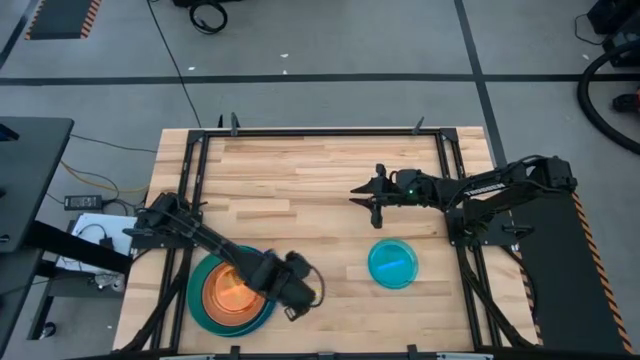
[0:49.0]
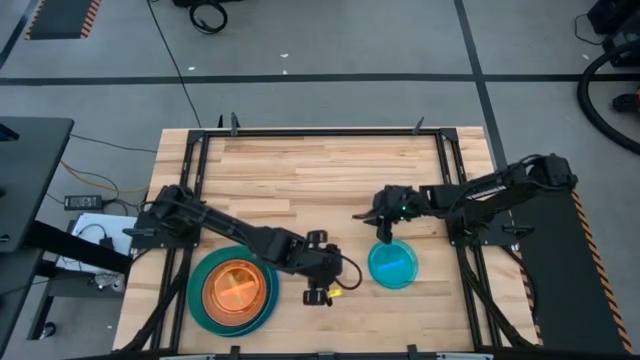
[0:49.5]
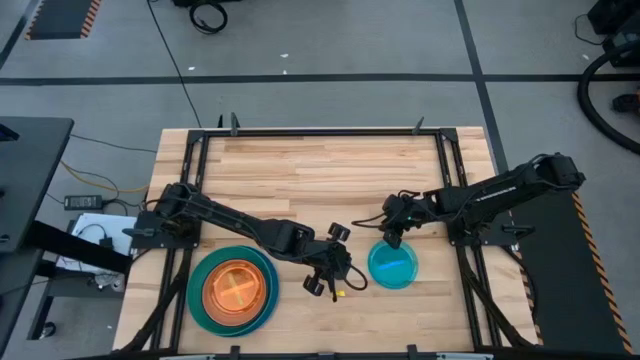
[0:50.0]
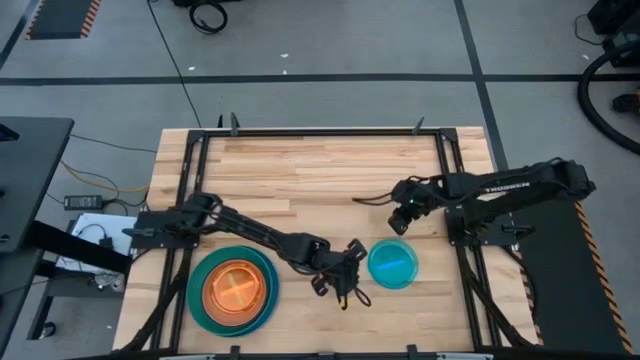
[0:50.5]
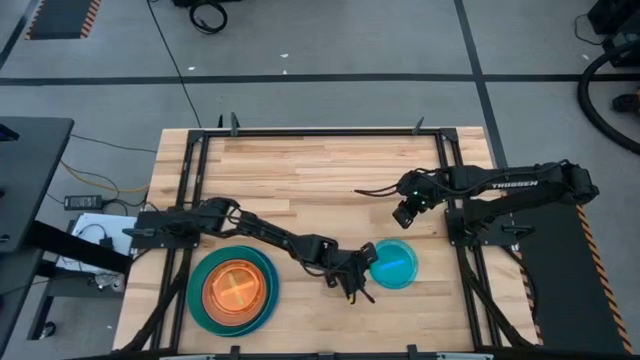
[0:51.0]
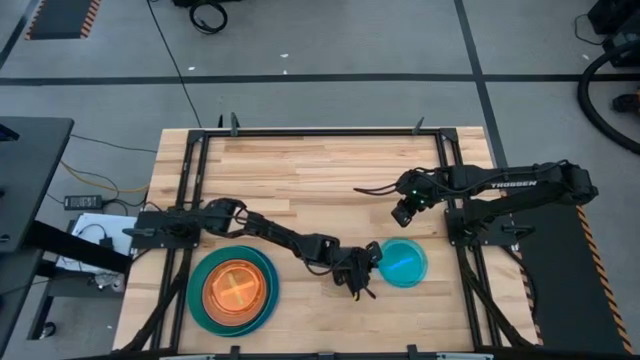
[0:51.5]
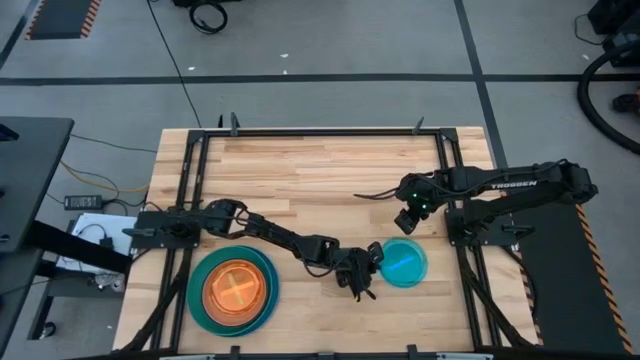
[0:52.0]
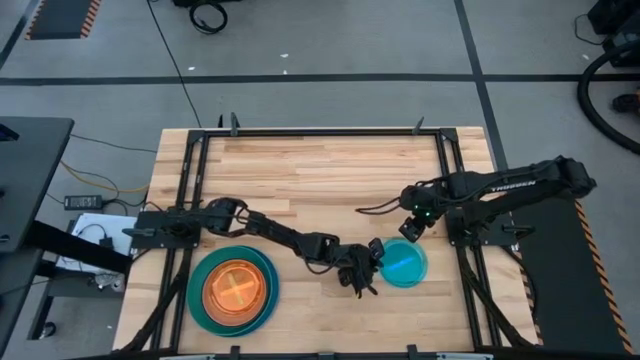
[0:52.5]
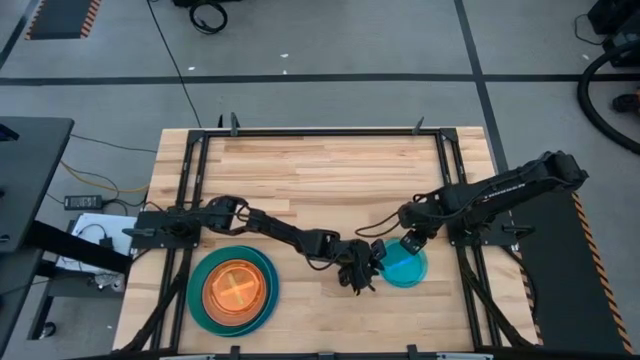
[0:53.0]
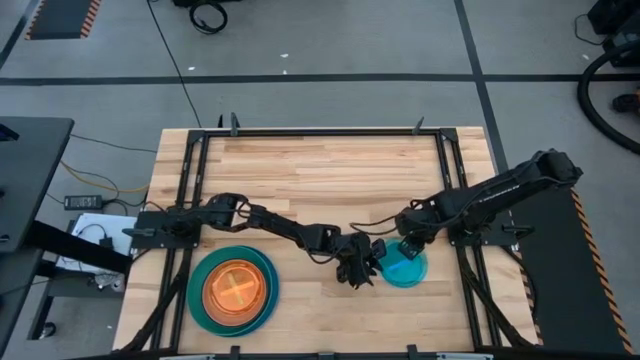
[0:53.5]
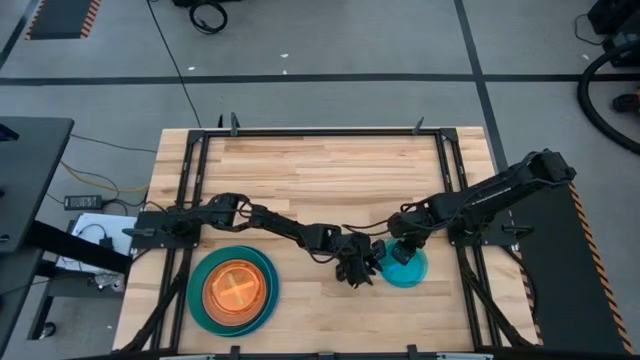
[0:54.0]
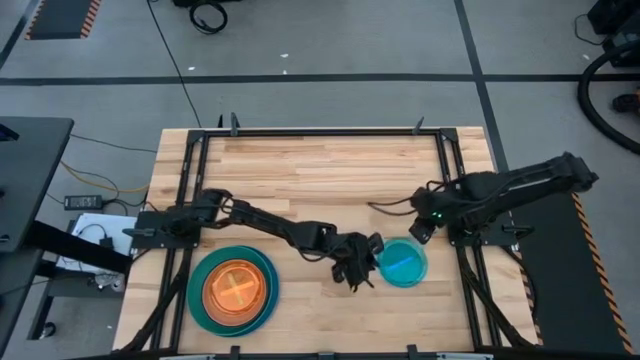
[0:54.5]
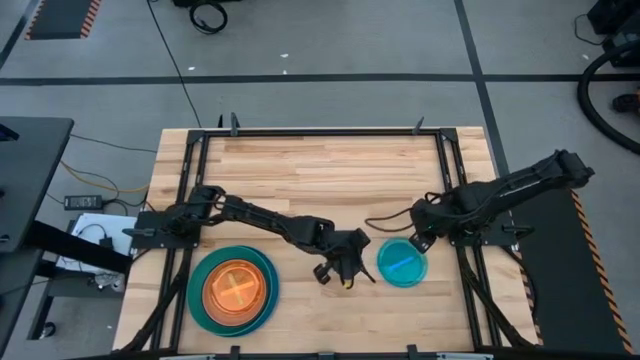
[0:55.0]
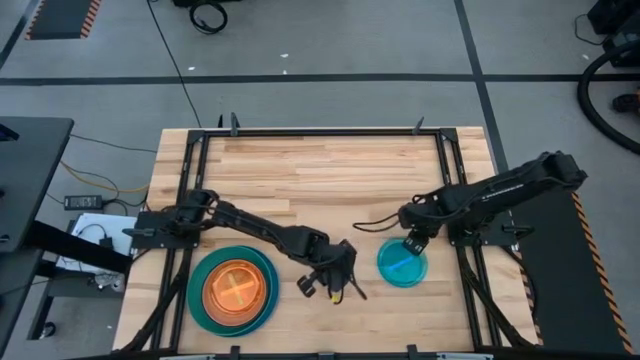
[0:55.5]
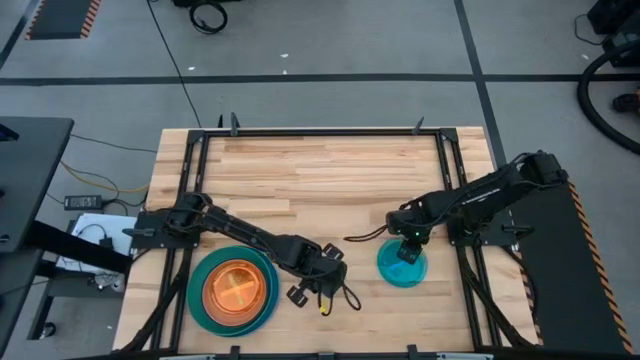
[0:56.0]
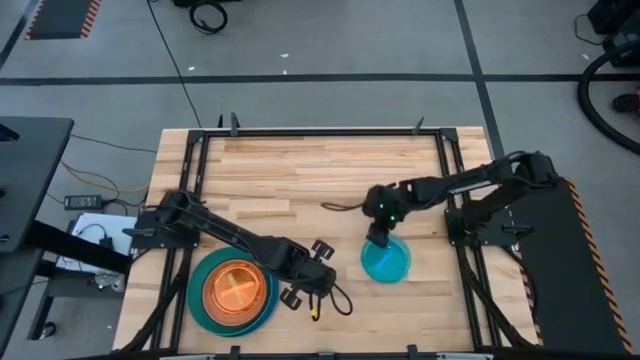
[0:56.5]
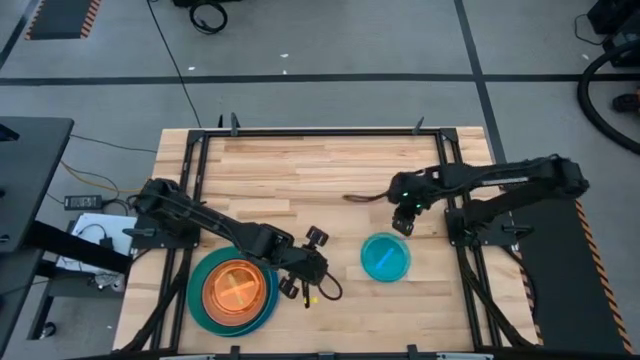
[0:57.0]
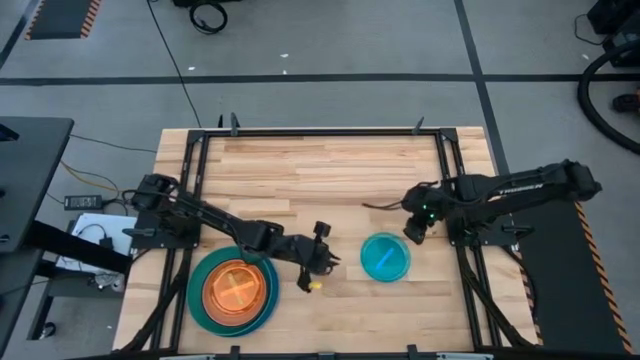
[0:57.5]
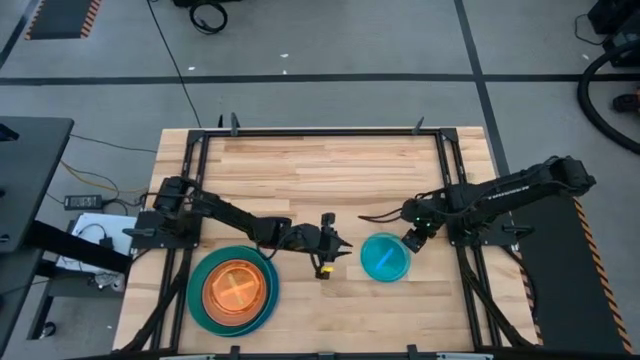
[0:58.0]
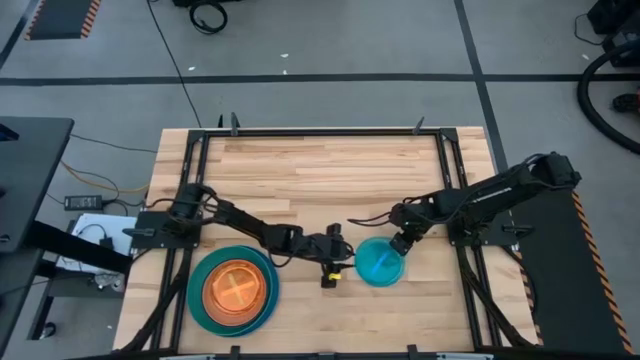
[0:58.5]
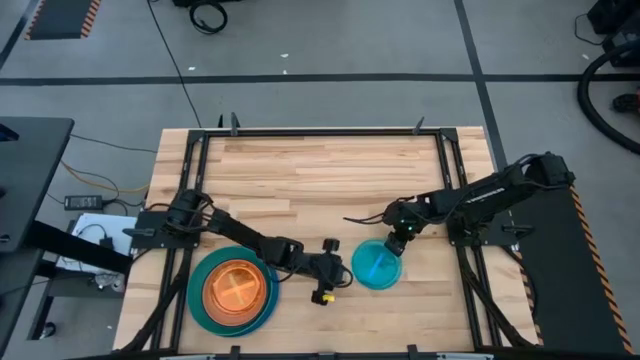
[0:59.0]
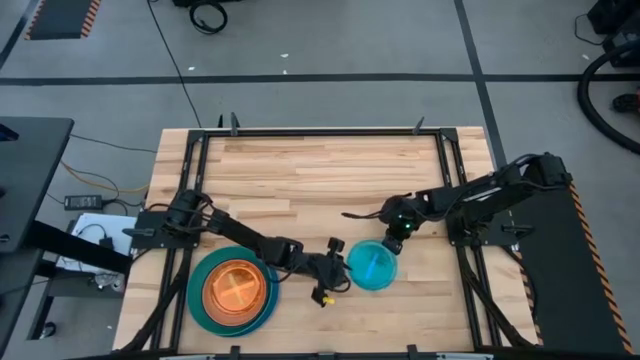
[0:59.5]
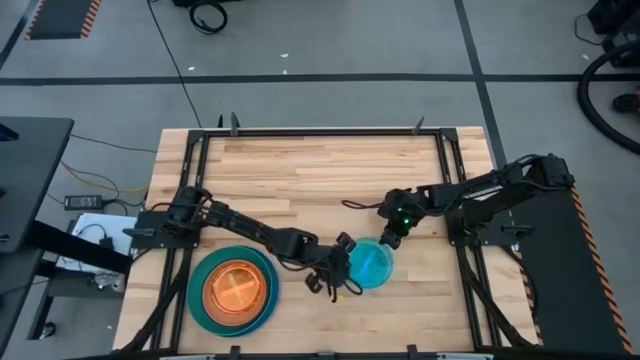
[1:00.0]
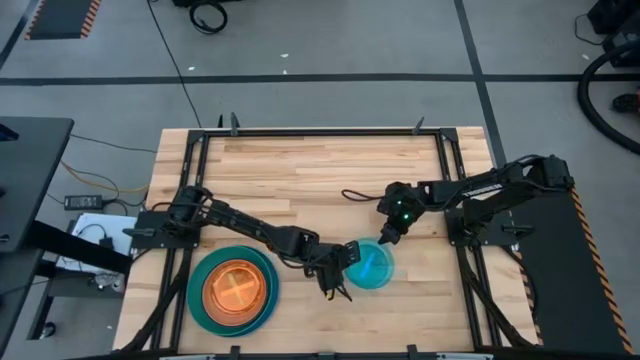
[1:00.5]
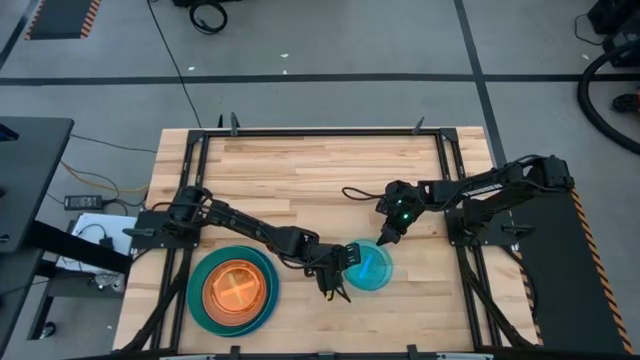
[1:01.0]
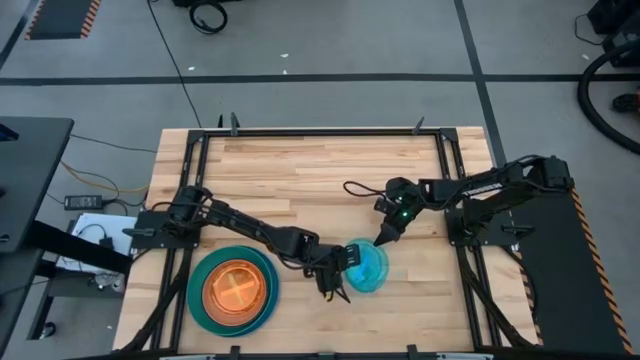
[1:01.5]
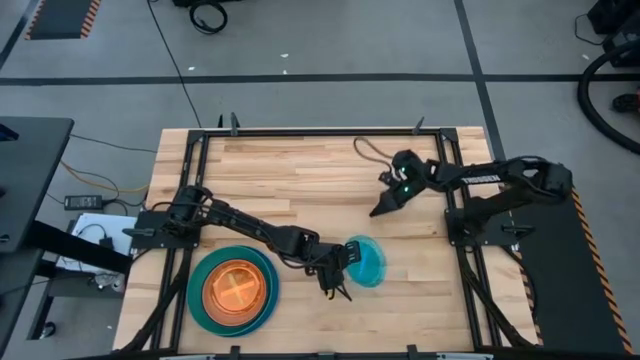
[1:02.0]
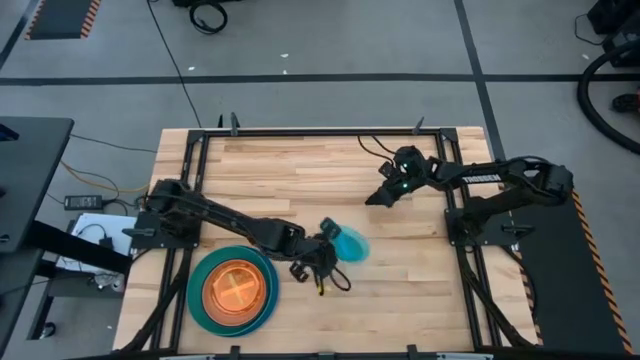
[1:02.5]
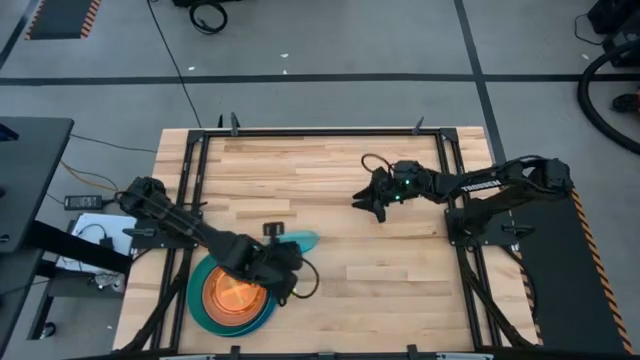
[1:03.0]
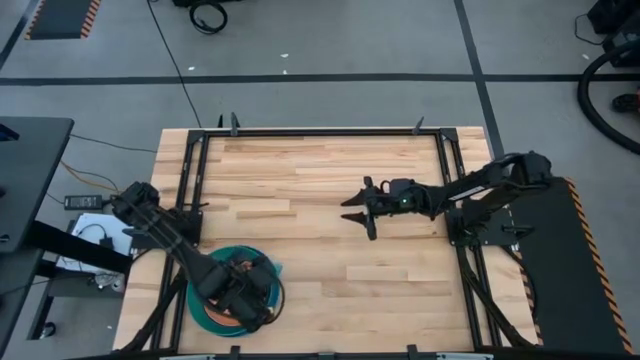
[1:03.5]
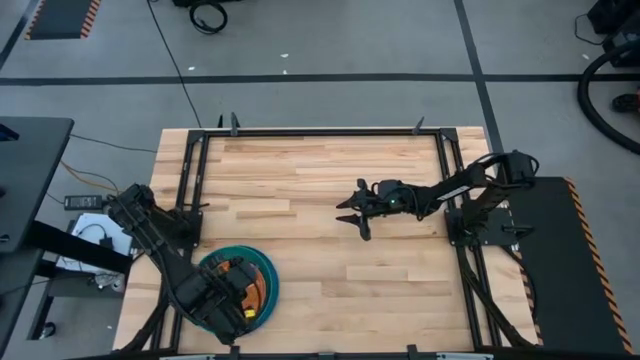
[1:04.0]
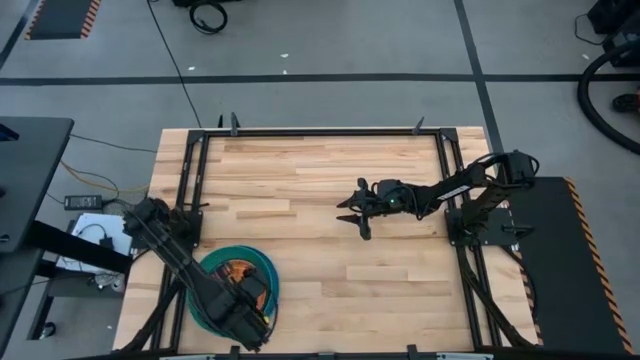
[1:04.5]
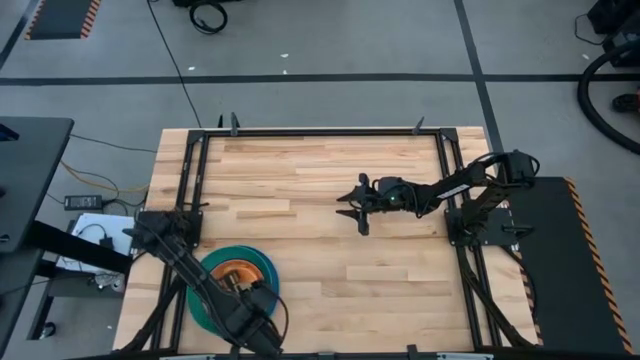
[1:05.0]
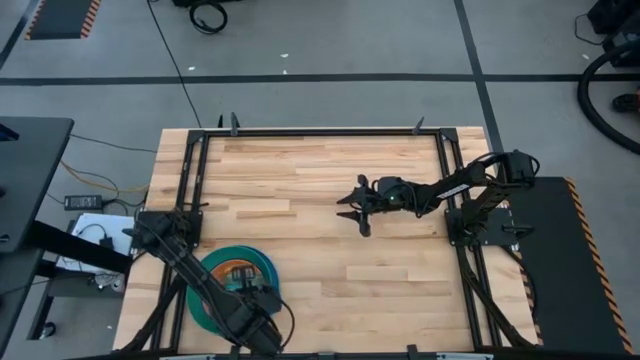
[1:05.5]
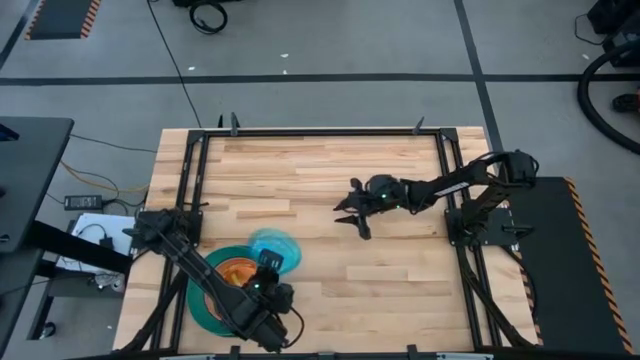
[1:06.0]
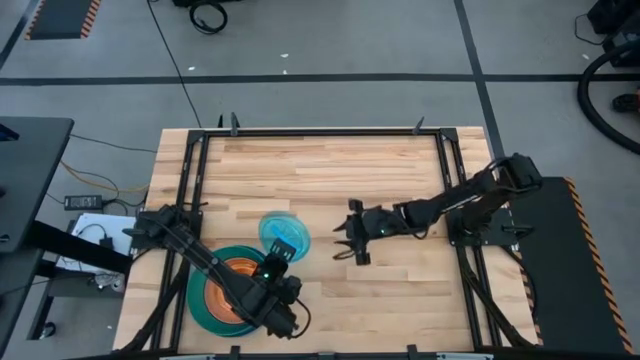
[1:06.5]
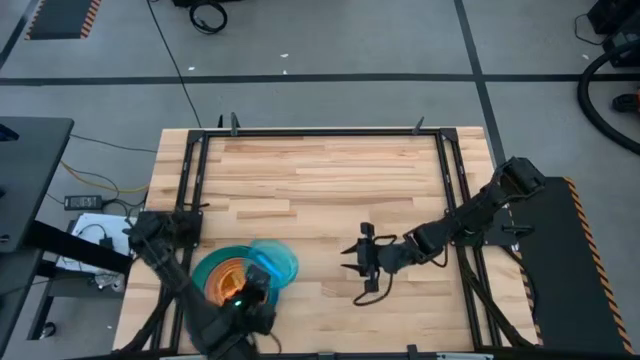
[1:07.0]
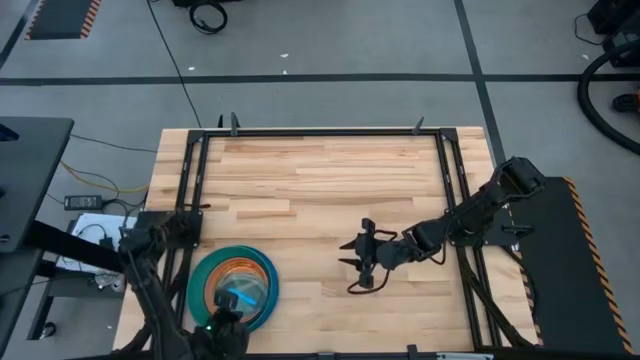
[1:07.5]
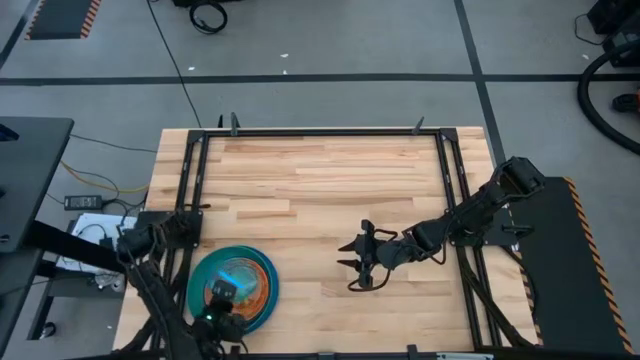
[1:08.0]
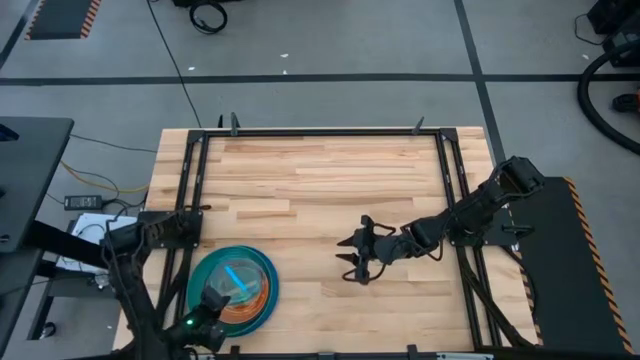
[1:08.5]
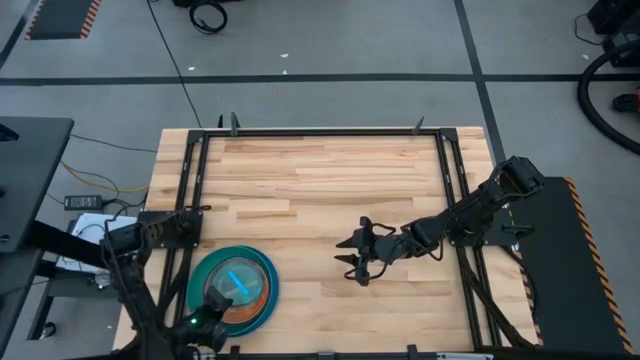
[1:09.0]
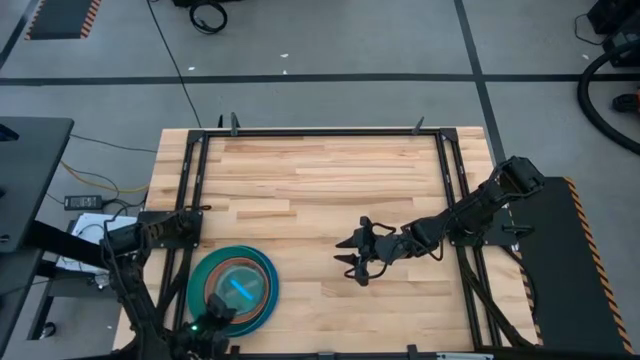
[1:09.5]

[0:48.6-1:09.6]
Task: Stack plastic plates
Stack the light blue plate on top of the orange plate

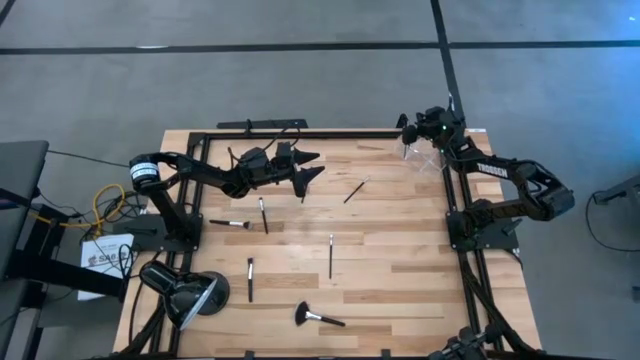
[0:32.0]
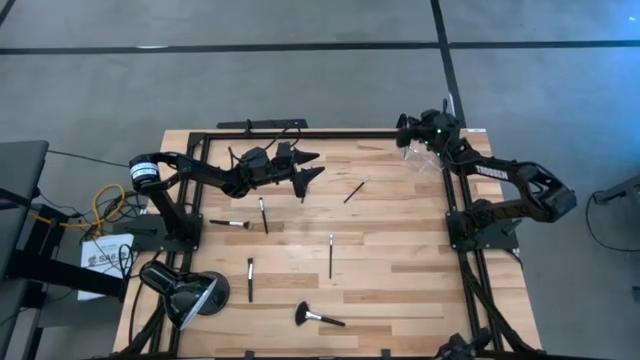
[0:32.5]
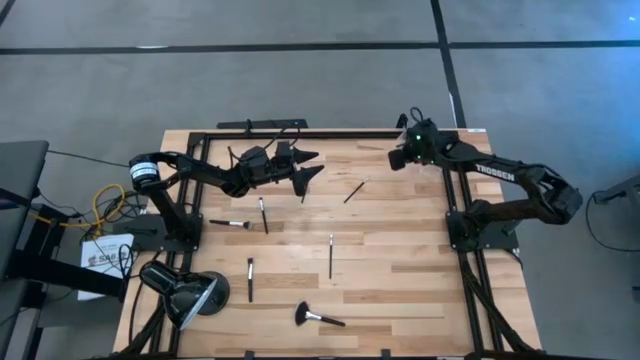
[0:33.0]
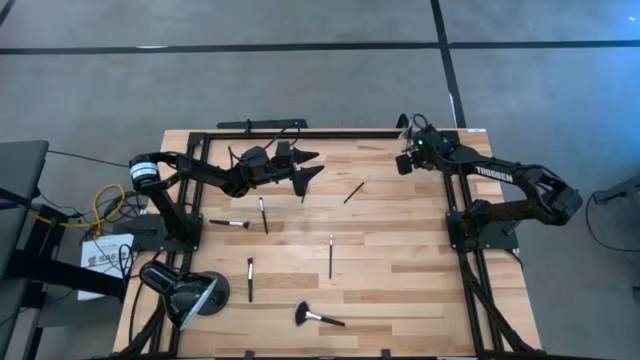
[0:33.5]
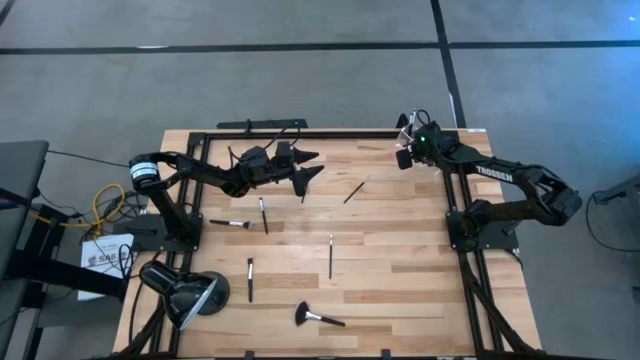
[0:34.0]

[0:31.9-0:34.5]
Task: Put items in baskets/containers
Adjust the transparent organizer
